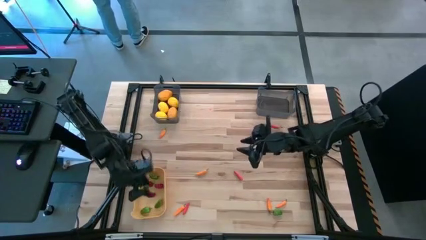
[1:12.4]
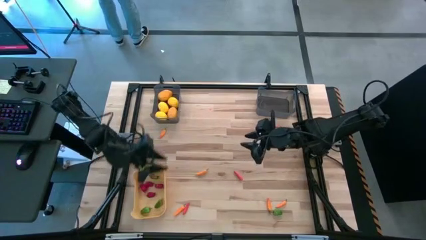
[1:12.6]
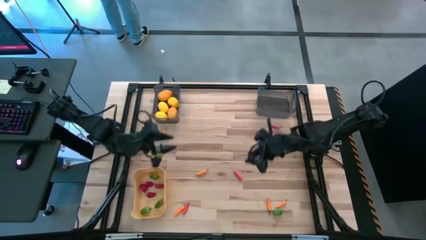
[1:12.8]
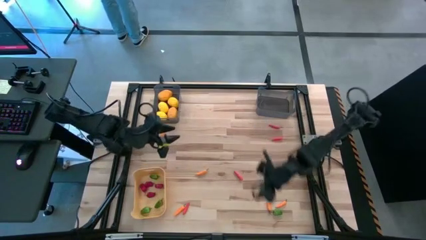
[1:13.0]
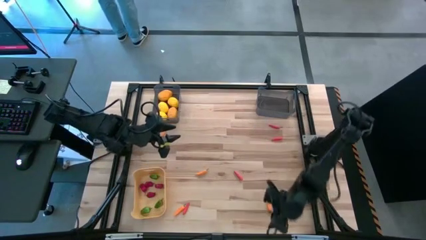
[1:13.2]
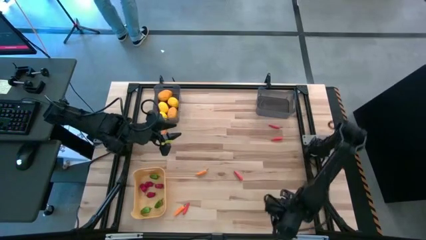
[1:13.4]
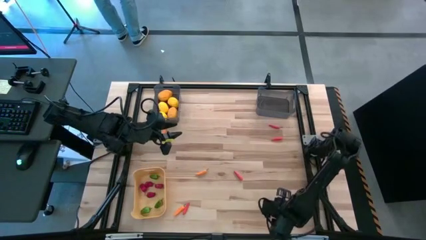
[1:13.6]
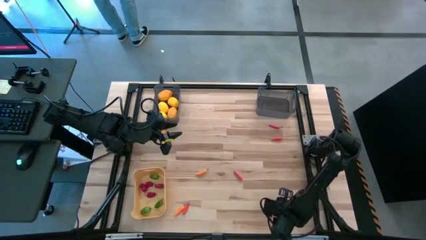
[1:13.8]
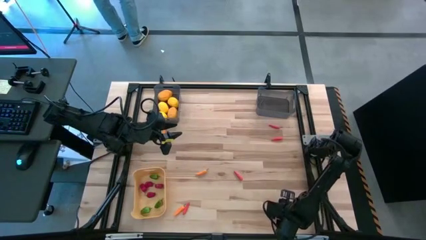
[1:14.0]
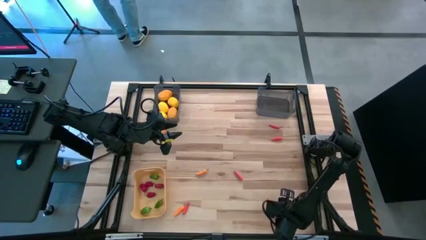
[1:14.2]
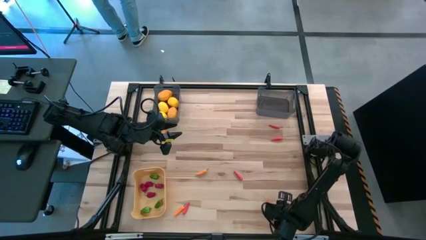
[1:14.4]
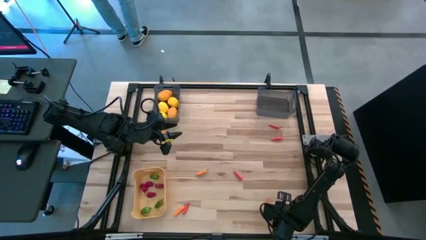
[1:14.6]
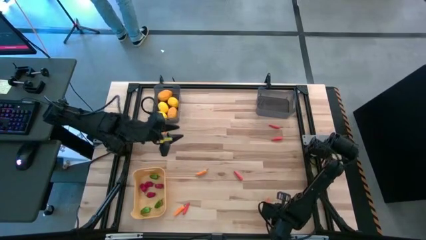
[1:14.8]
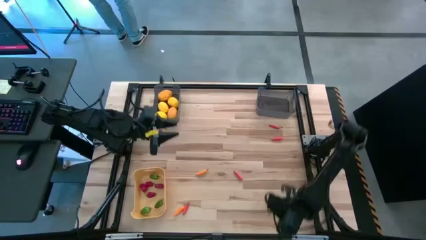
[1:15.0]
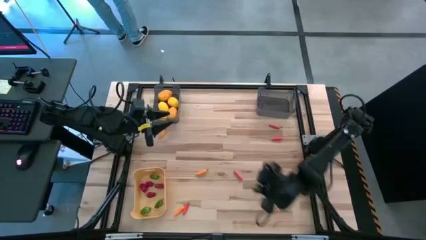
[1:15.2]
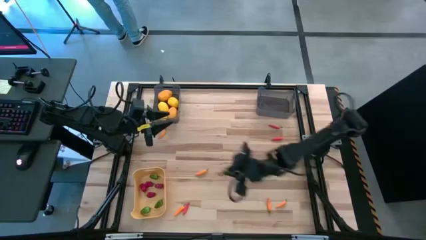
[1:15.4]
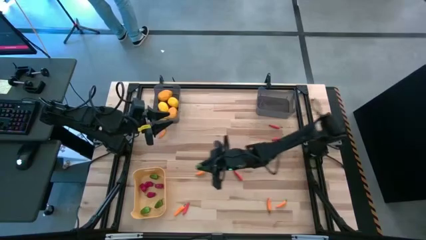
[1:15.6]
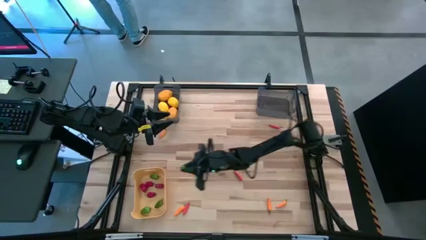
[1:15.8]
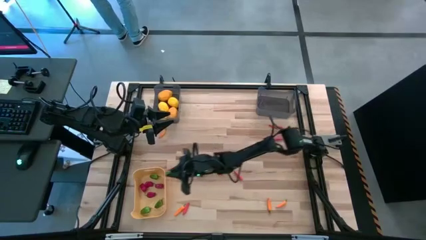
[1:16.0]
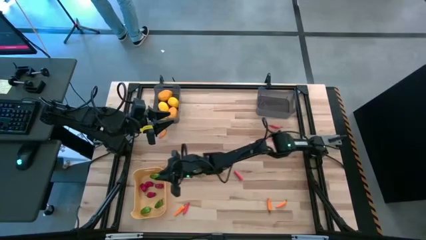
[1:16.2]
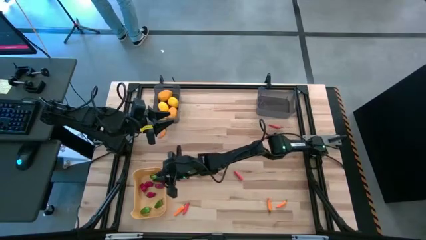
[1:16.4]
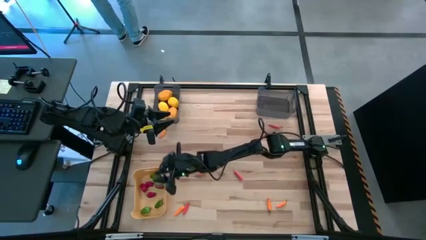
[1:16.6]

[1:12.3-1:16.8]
Task: Sort produce into baskets
Put the green bell pepper into the yellow bin

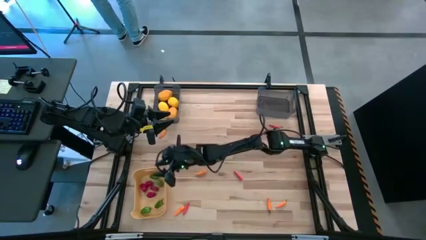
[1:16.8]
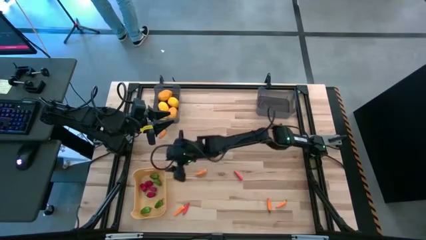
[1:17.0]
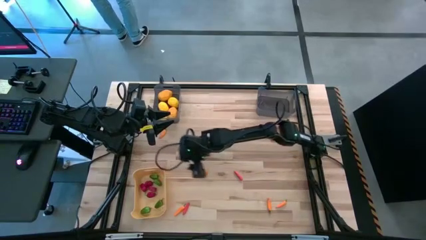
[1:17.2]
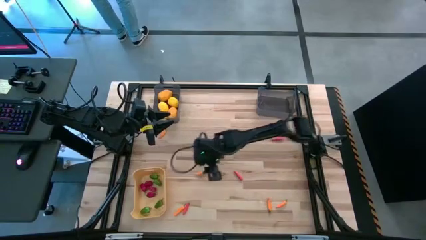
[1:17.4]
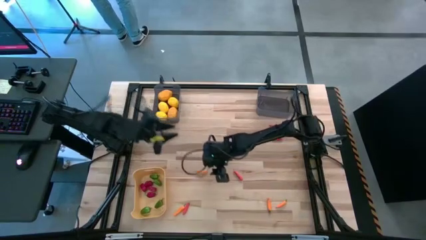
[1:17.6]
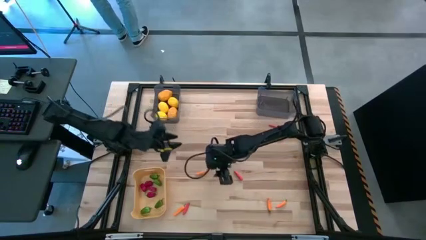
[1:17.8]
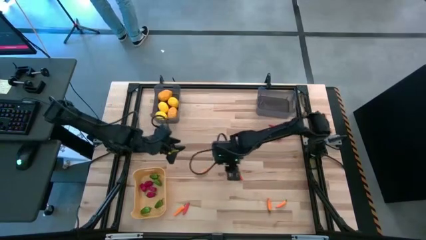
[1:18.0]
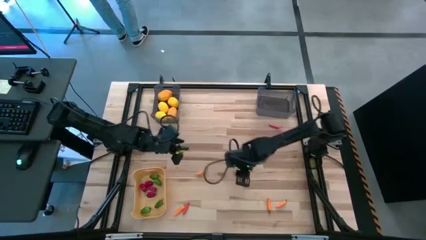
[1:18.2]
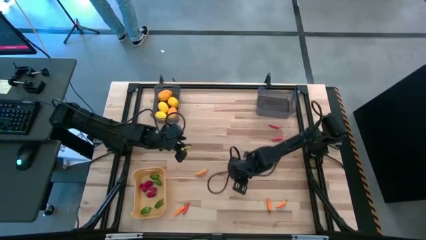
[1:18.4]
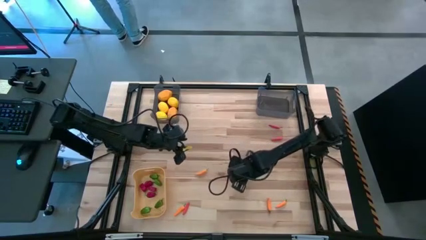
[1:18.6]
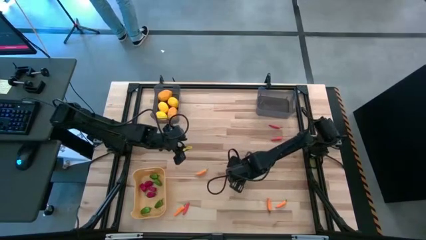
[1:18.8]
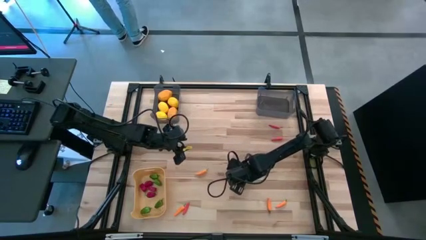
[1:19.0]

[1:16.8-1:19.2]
Put the center red chili into the right black bin

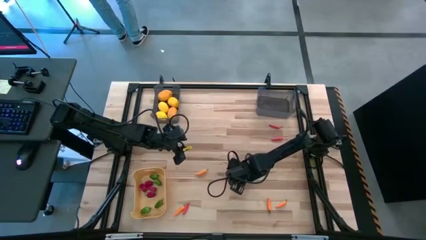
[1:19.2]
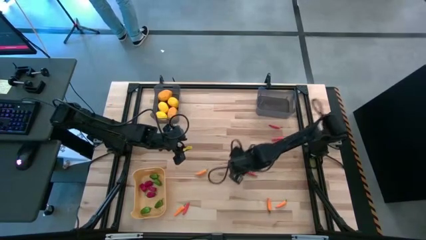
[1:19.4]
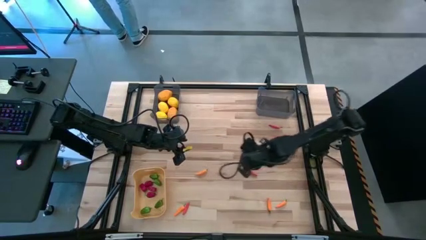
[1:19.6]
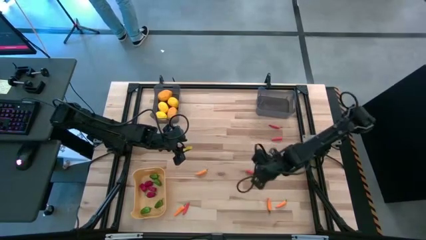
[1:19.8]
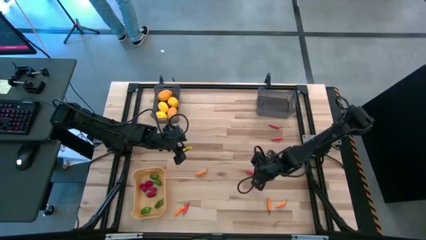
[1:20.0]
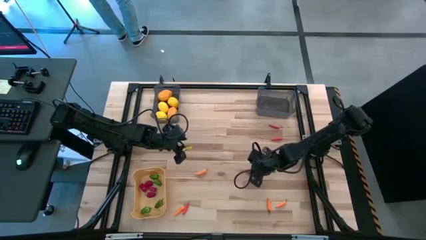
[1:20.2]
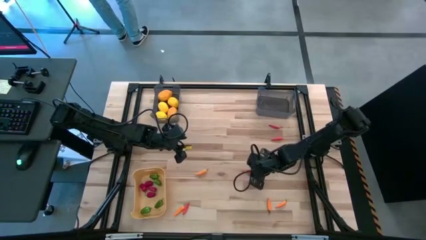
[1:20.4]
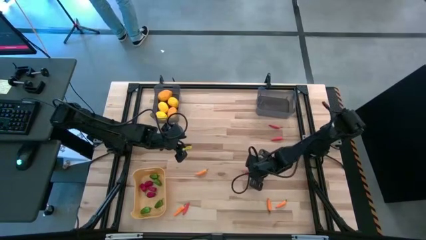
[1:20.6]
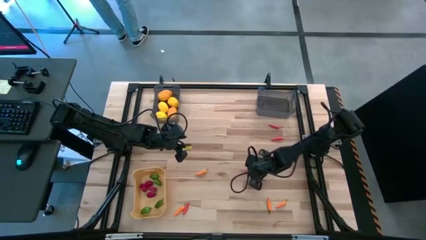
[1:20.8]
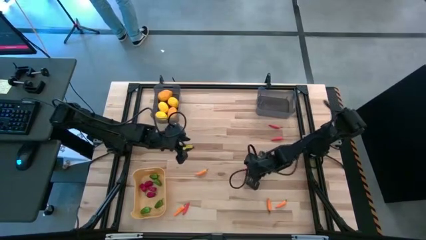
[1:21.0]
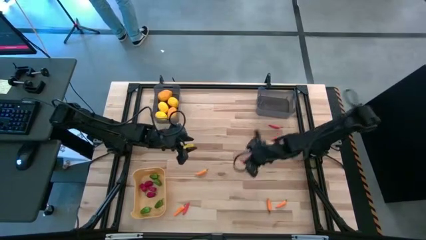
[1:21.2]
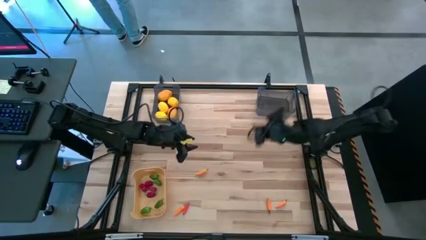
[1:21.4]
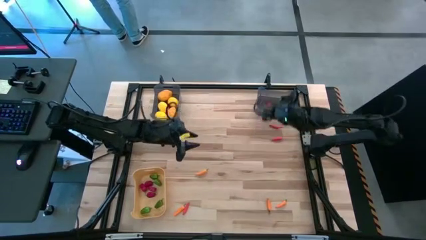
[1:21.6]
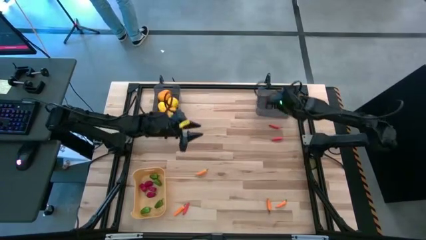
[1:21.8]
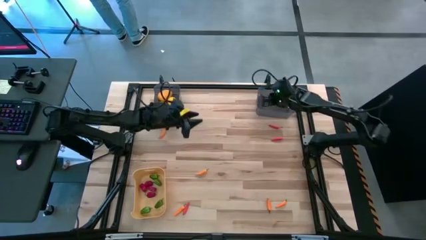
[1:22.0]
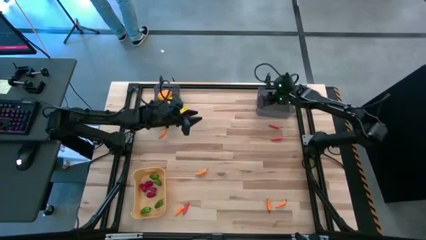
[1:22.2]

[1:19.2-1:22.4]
Put the center red chili into the right black bin

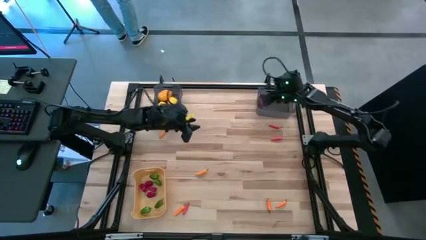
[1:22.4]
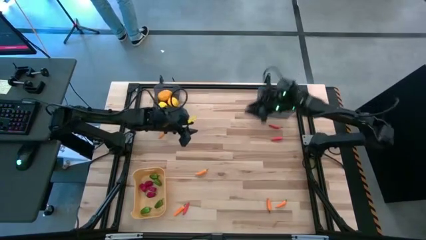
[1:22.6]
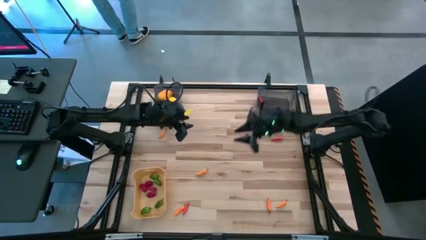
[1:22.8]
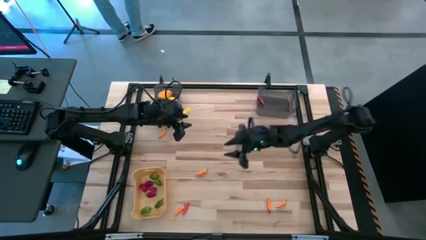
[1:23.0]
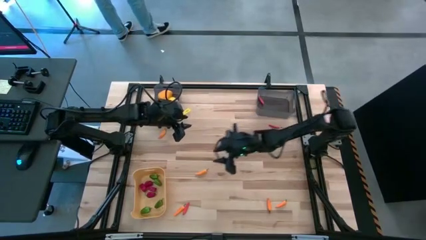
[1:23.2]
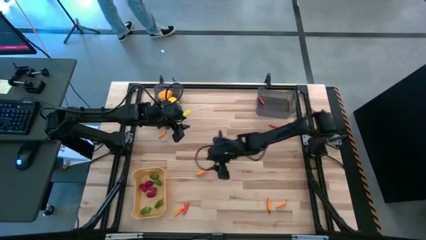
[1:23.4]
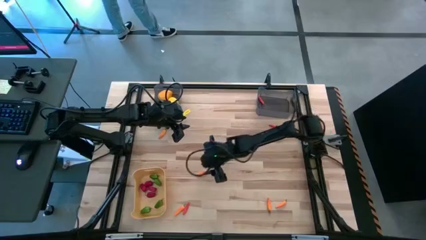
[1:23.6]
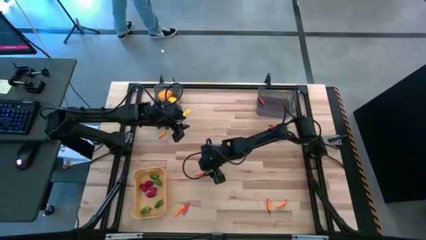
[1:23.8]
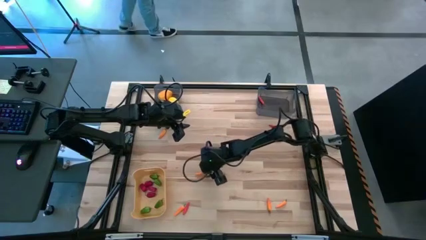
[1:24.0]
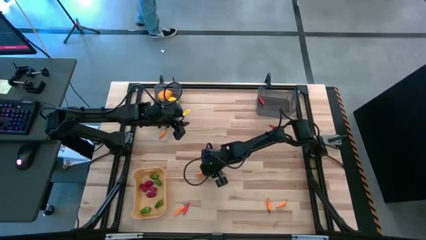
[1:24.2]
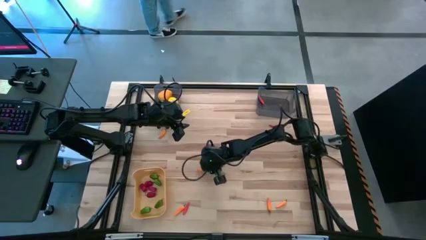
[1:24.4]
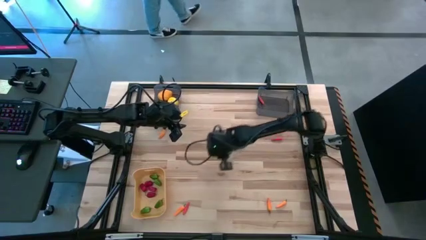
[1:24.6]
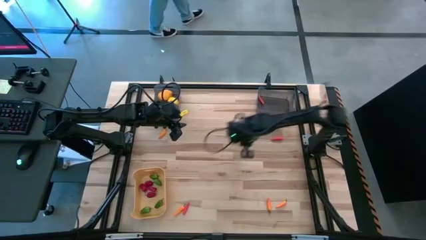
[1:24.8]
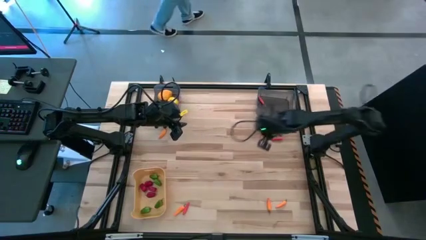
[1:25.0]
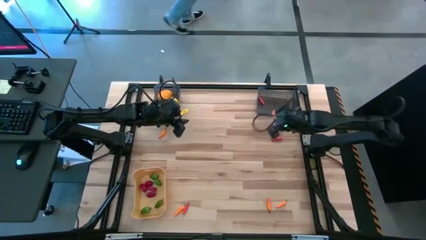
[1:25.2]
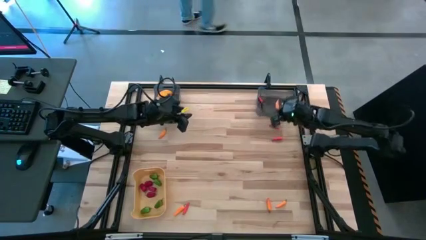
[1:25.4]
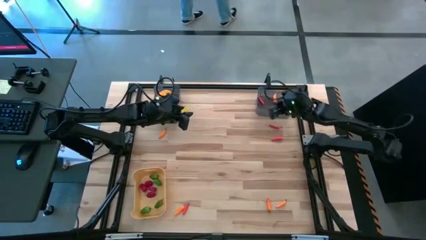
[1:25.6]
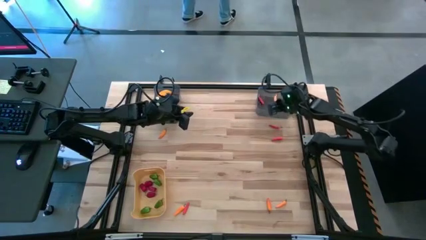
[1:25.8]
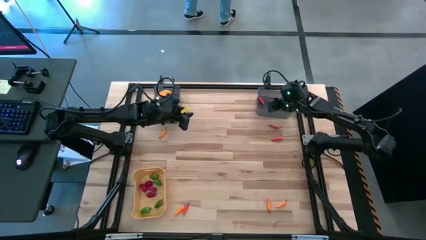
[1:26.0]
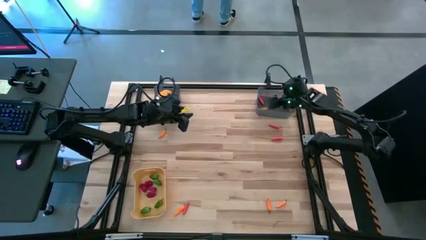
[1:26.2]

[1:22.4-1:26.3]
Put the center yellow chili into the right black bin

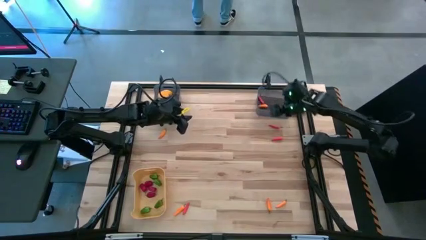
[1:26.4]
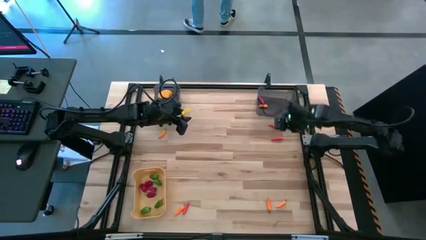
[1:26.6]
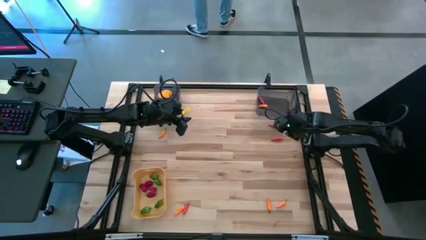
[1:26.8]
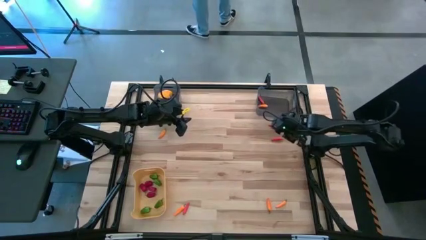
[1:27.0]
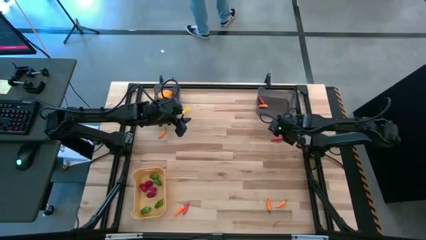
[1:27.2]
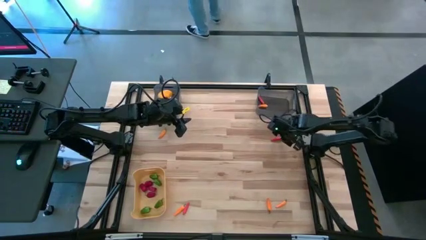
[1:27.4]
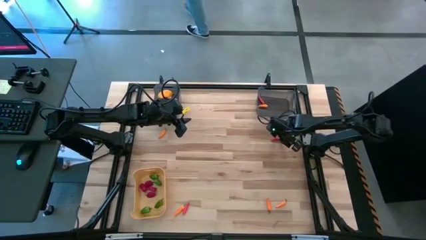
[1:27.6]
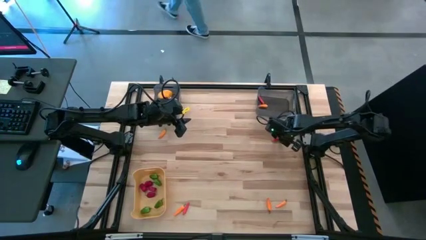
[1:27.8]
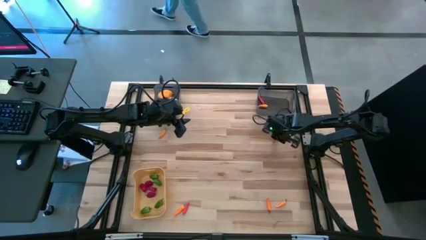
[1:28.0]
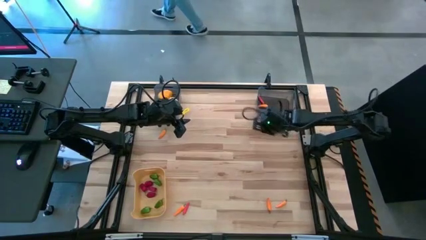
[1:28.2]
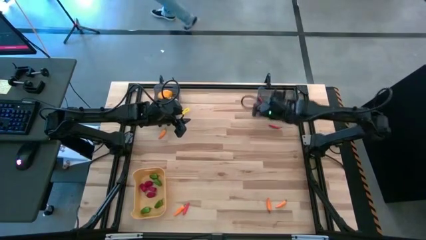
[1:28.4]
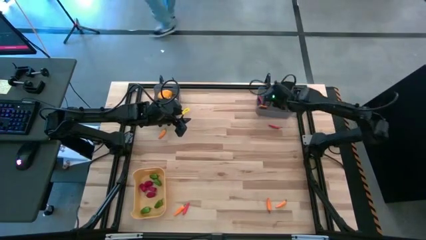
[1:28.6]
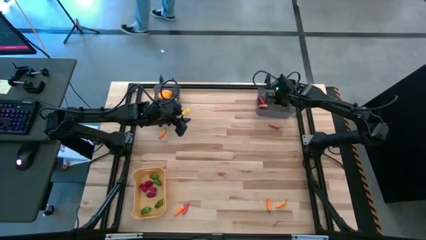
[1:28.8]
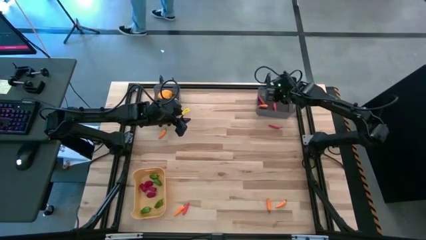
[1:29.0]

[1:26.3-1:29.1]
Put the top right red chili into the right black bin
